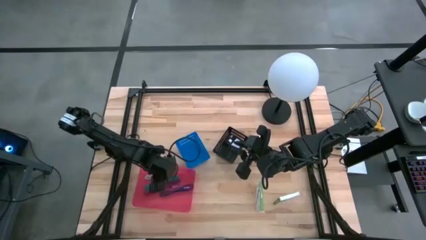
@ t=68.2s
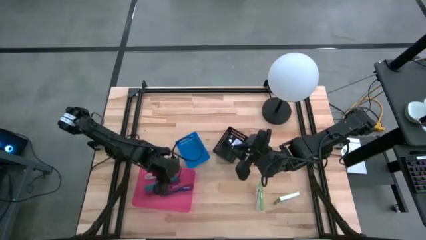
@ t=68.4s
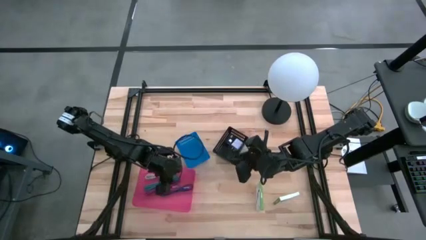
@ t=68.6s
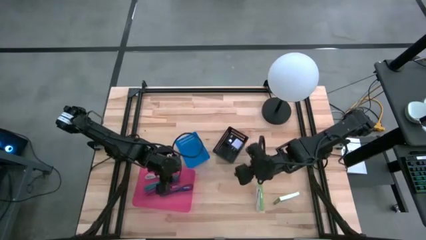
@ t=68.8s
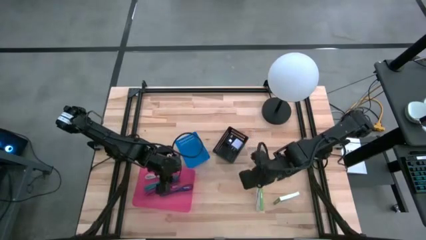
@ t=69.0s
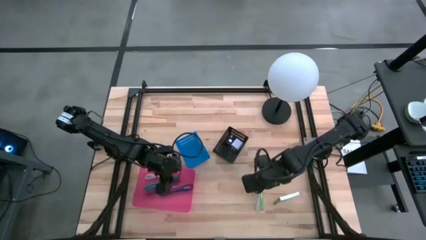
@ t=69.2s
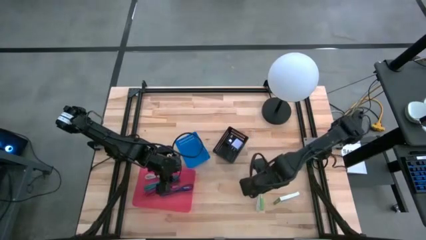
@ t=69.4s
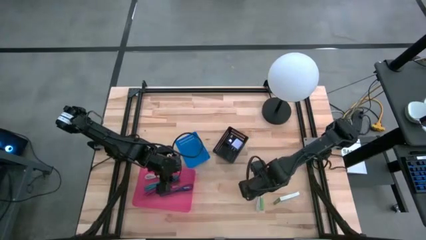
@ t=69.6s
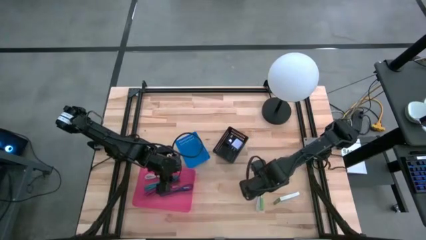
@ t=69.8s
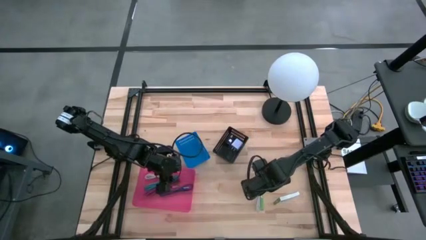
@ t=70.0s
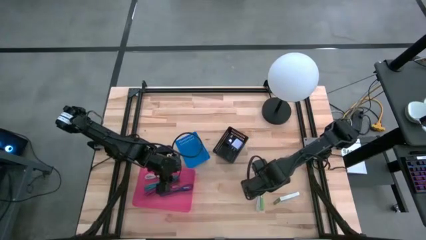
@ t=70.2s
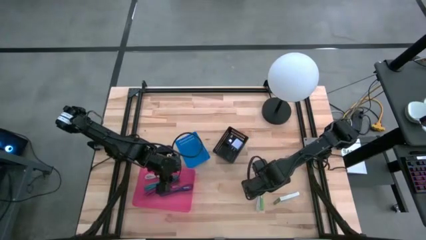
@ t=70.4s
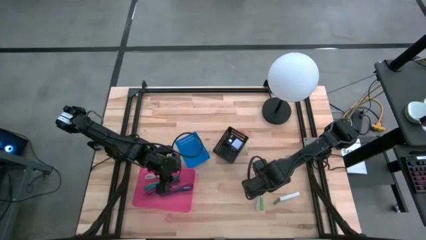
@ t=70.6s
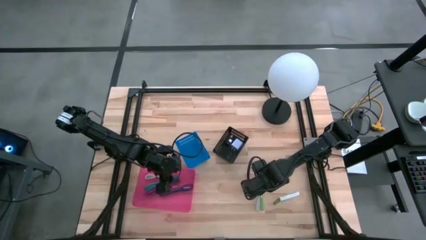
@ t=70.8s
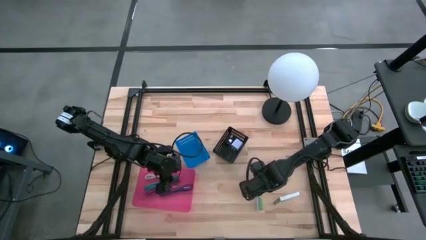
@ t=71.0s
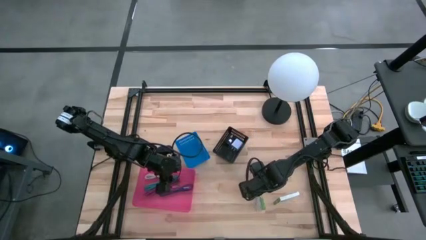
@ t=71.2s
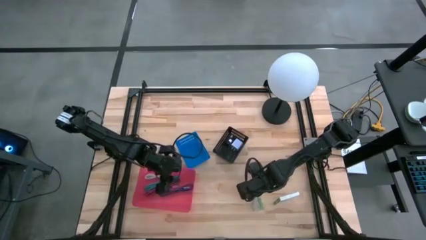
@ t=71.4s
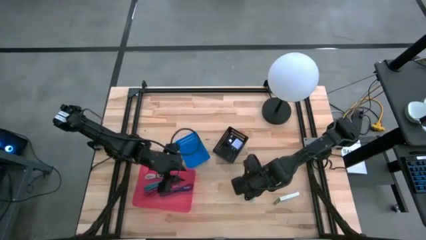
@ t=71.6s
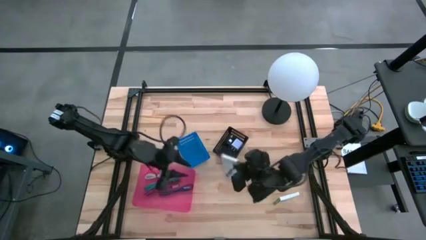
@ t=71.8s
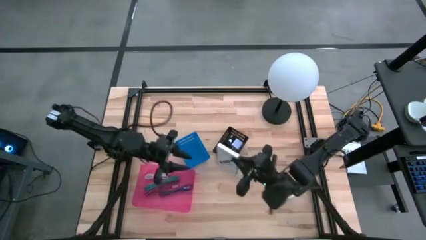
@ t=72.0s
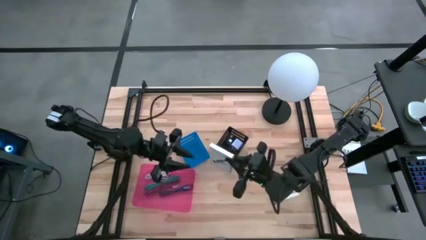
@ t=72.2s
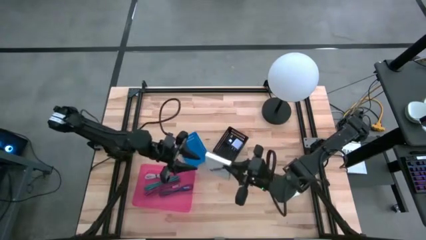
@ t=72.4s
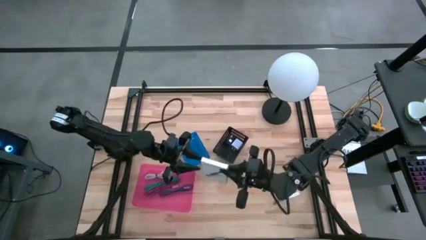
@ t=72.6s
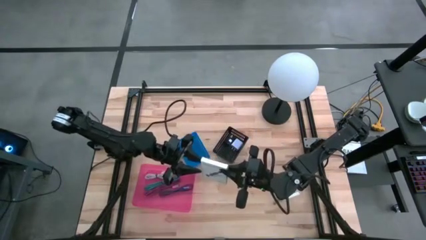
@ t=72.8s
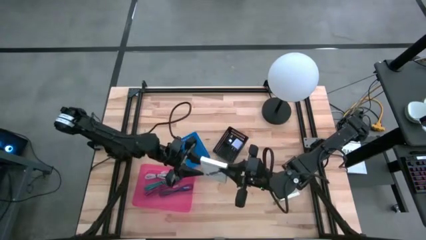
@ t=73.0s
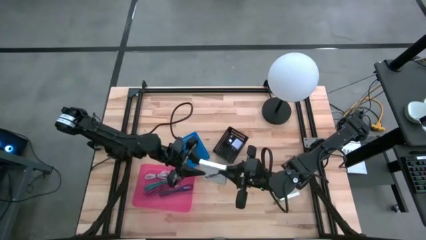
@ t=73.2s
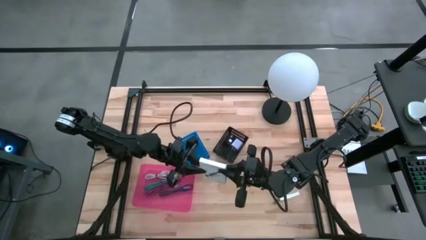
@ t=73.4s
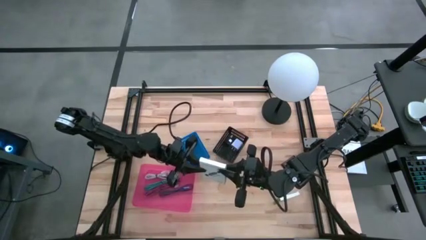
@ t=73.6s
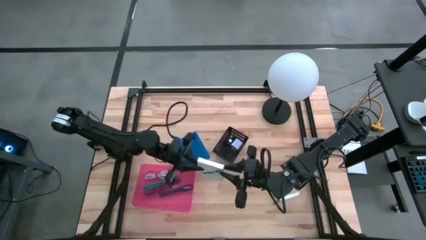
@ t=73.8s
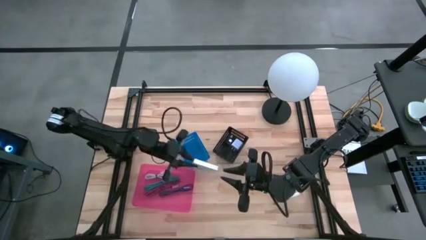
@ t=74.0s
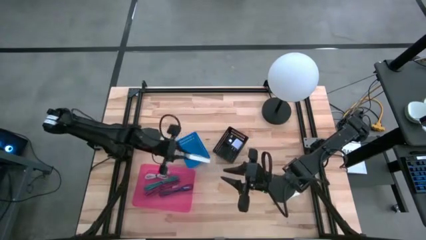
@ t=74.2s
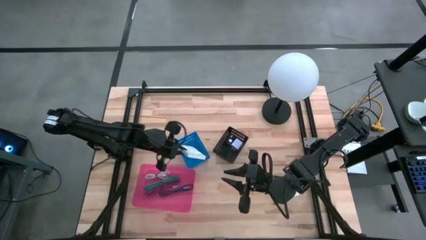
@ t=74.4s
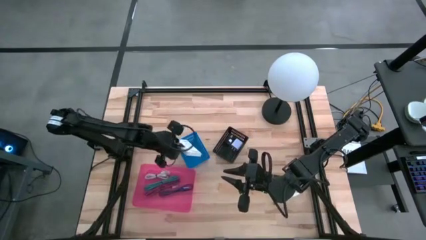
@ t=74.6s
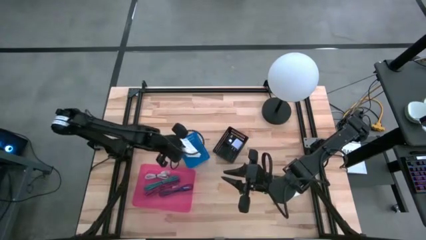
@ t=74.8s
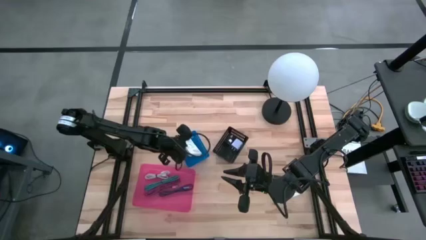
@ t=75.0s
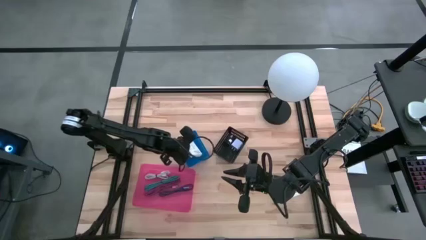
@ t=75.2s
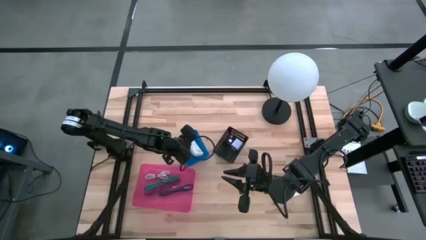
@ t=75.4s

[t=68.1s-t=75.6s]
Task: Pick and place items into bin
Put the left white card reader box into the blue bin

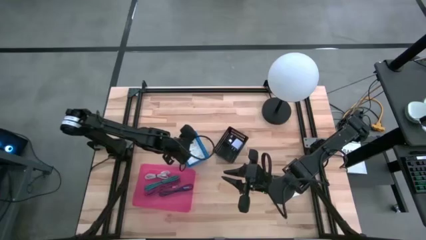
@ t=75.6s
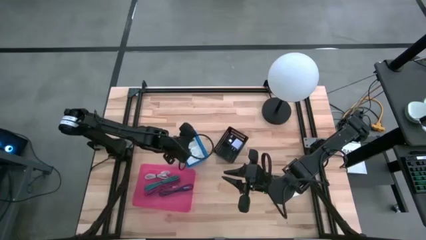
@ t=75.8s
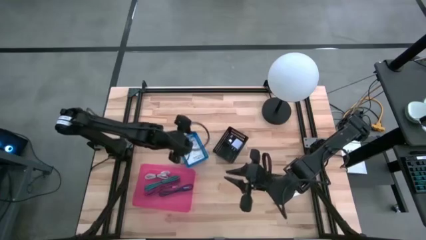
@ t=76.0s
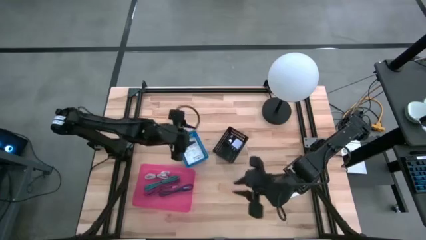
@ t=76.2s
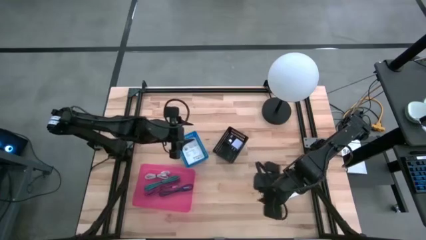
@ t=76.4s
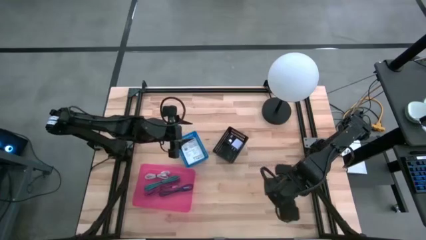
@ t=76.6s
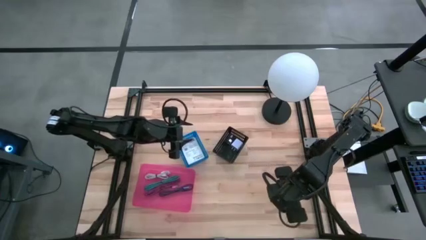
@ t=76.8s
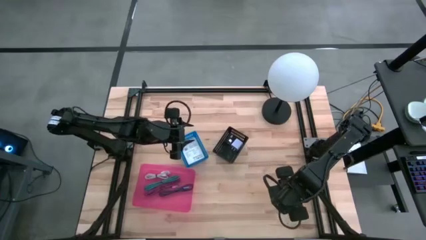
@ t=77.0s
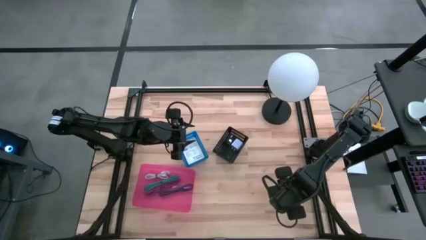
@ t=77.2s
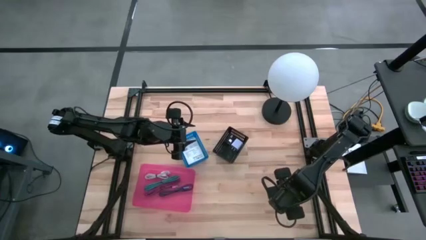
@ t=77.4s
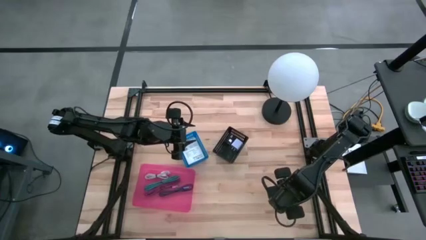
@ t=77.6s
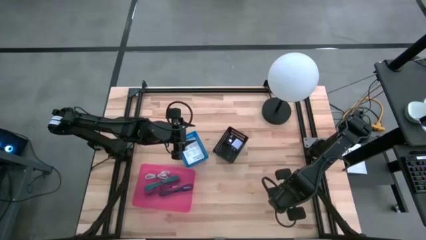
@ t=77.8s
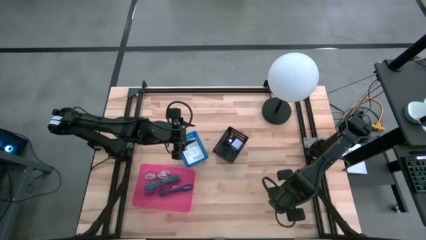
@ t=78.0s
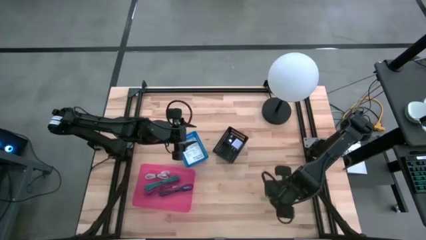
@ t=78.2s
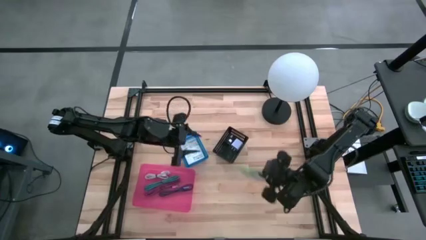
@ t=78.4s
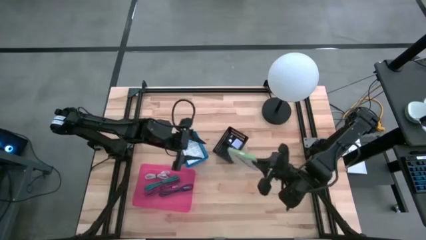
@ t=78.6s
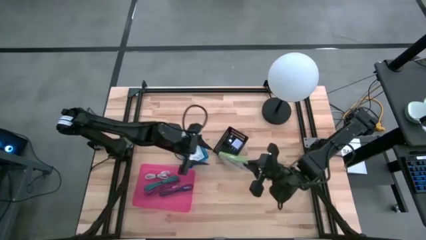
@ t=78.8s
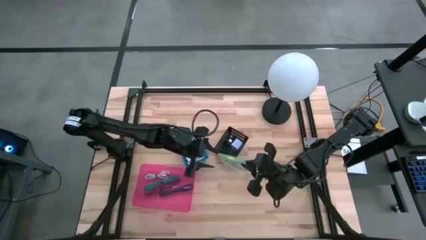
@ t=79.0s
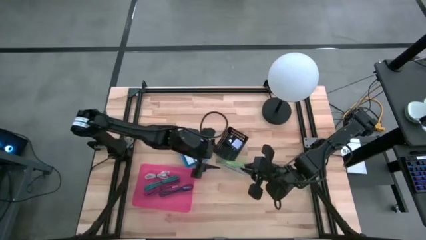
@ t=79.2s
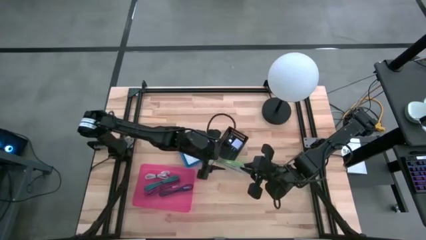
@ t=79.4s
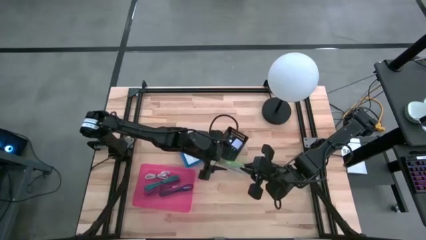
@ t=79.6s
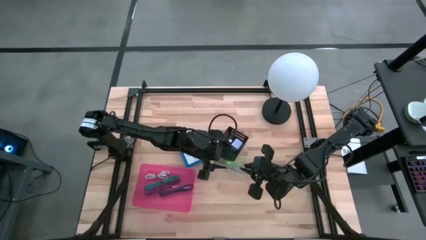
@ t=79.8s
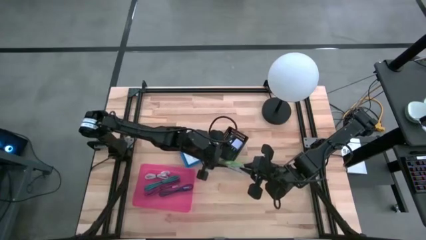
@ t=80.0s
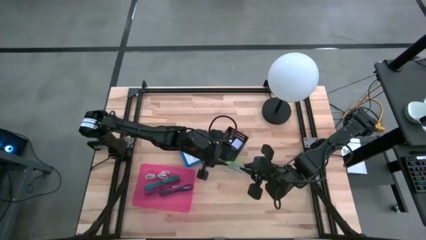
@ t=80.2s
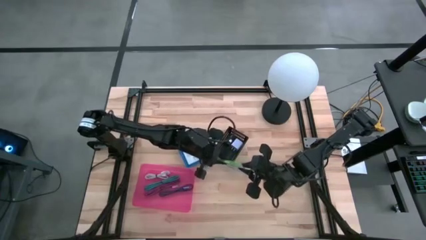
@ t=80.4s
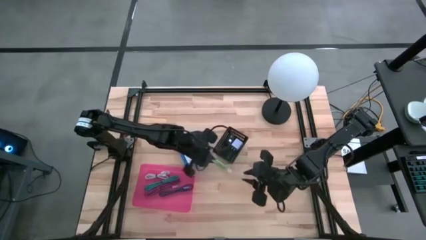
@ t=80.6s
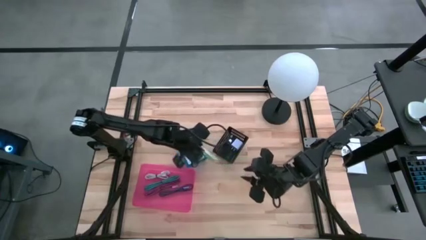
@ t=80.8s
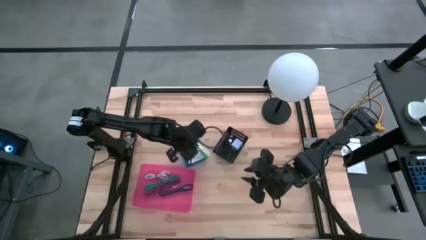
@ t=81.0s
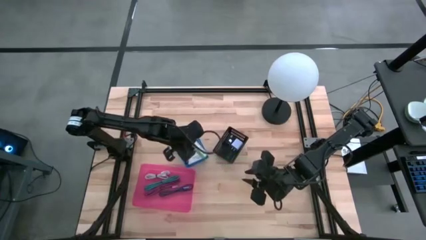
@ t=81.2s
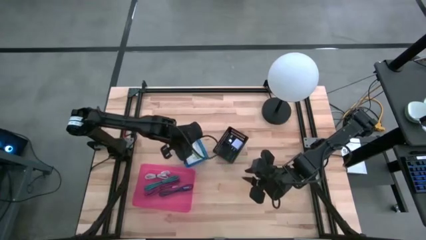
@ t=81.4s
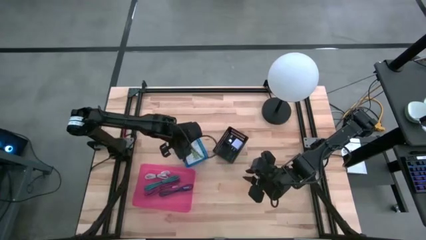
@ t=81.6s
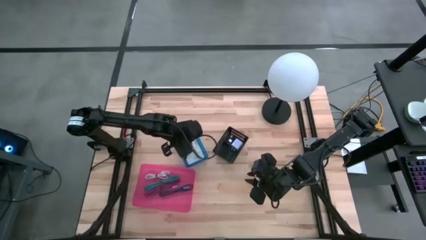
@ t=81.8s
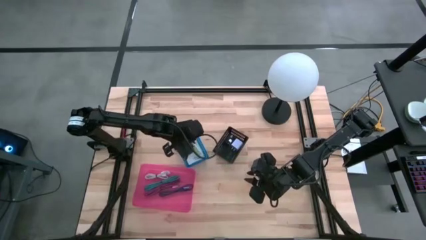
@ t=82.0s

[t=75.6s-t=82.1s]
Put the white card reader box into the blue bin
